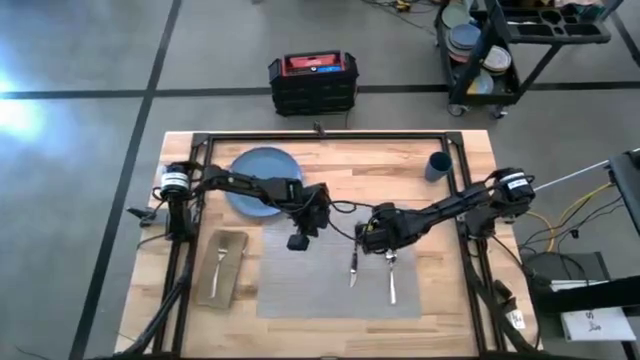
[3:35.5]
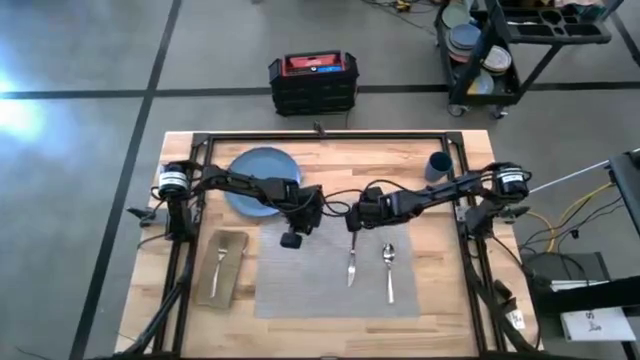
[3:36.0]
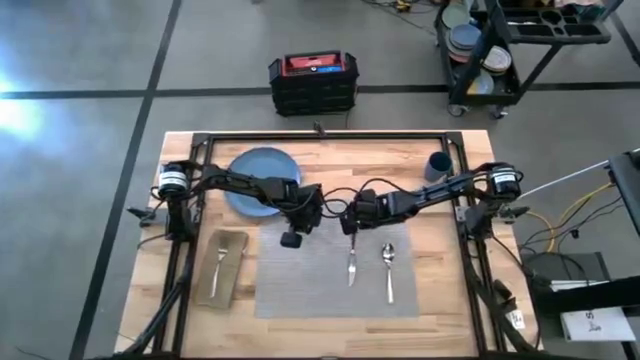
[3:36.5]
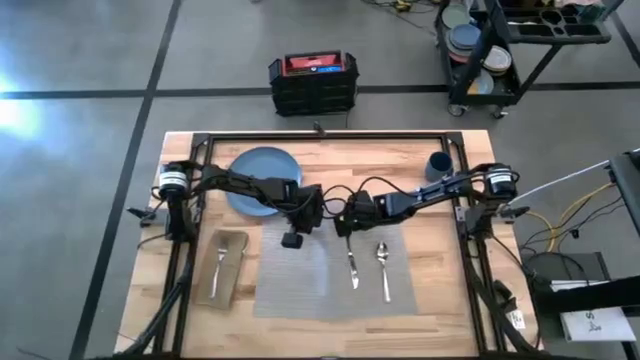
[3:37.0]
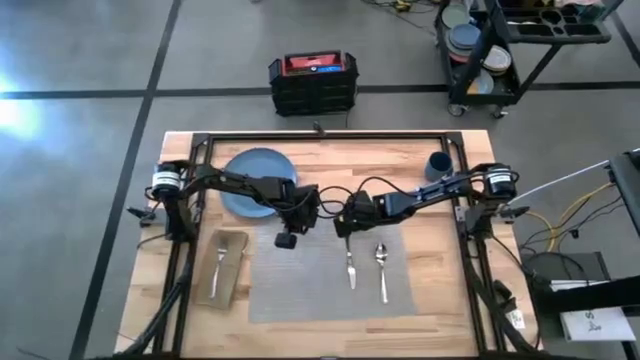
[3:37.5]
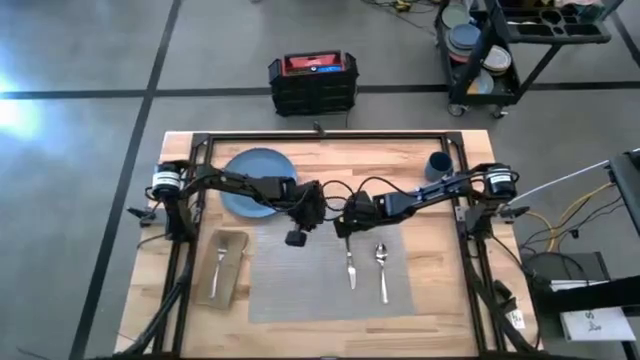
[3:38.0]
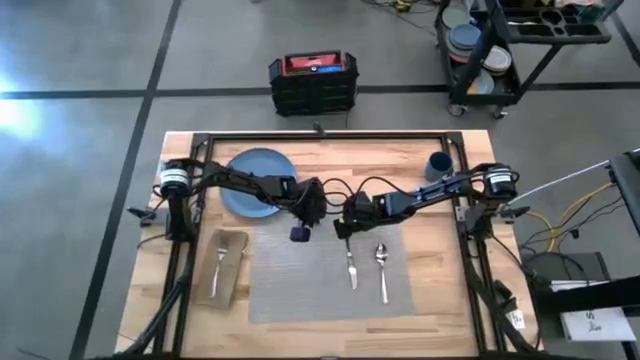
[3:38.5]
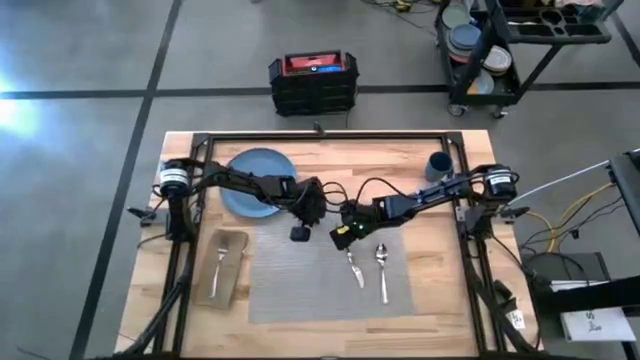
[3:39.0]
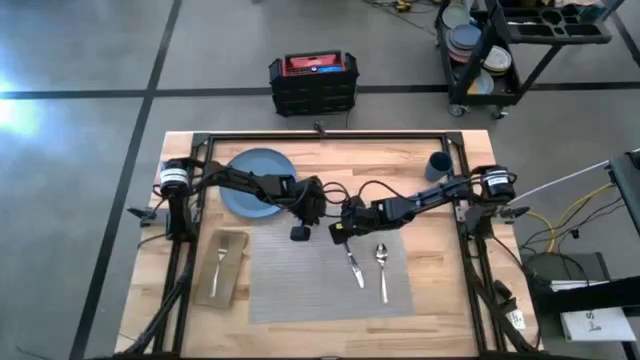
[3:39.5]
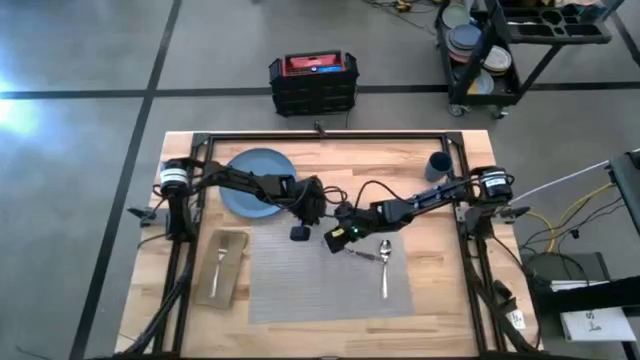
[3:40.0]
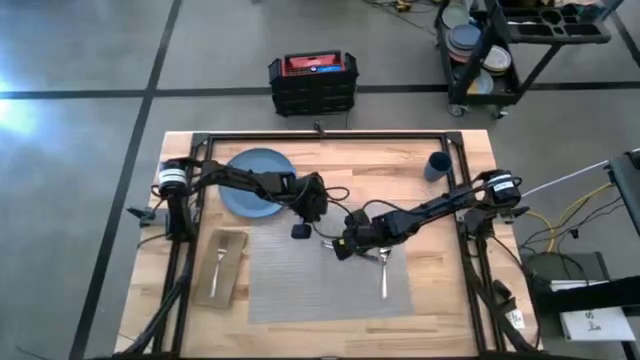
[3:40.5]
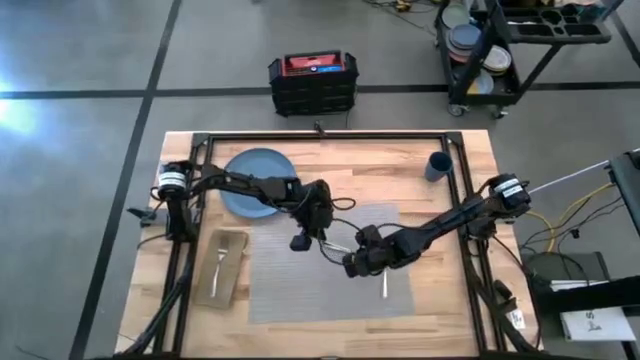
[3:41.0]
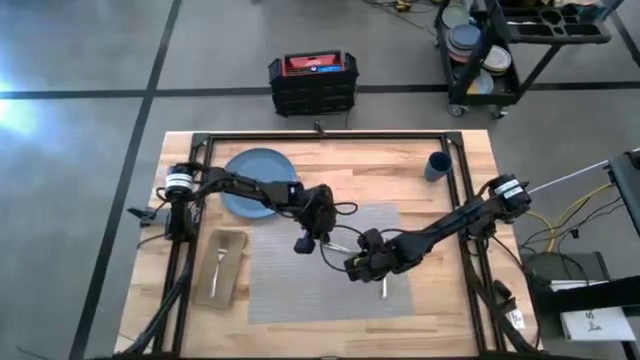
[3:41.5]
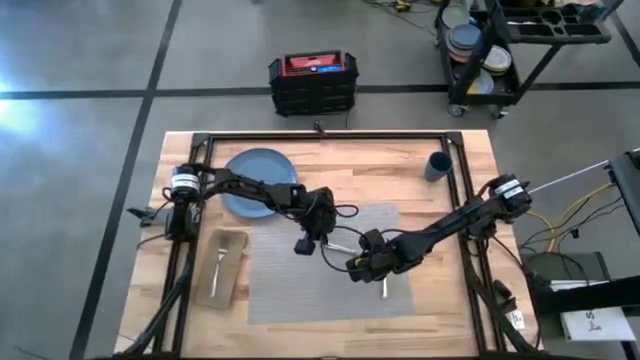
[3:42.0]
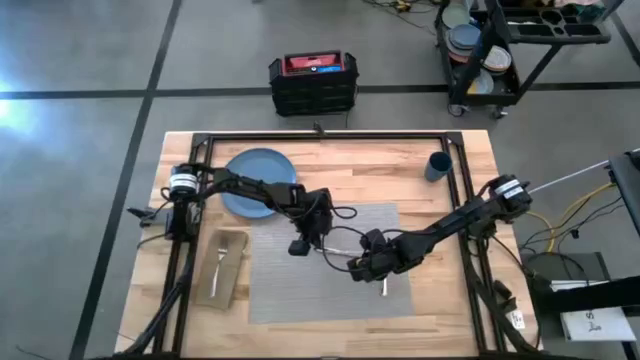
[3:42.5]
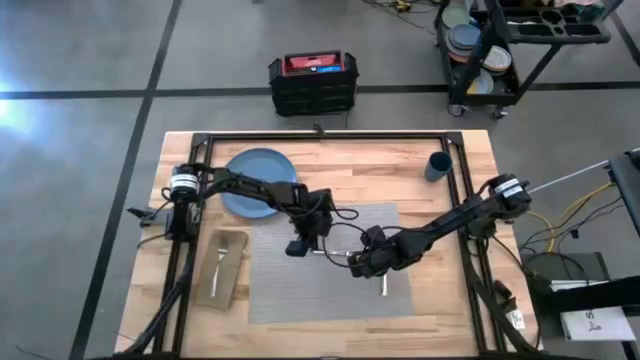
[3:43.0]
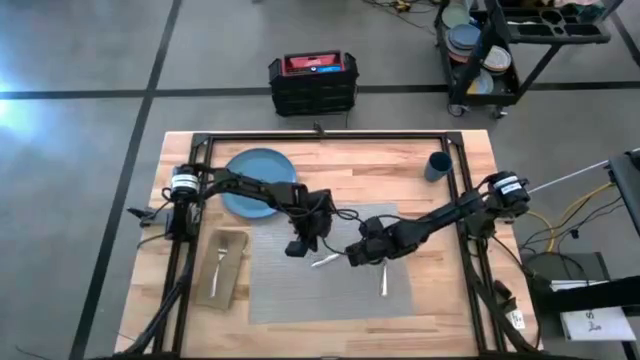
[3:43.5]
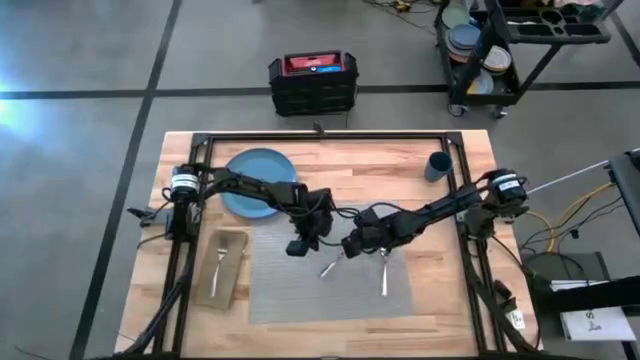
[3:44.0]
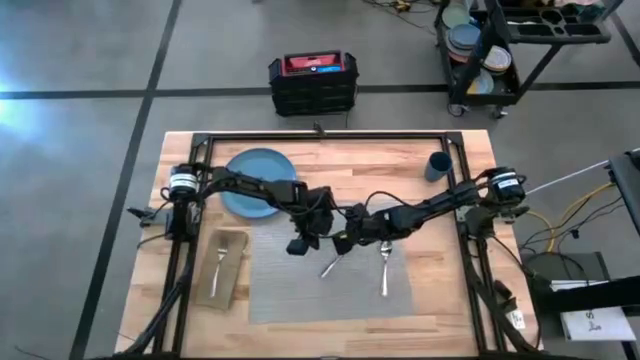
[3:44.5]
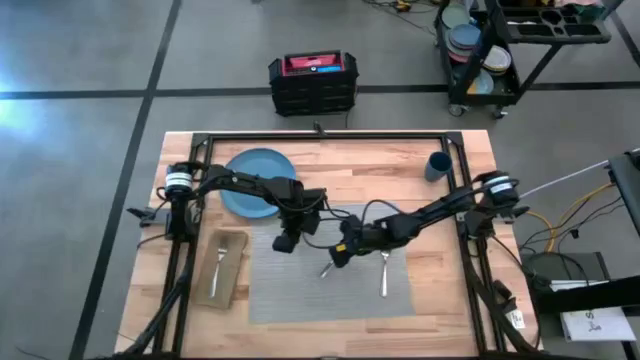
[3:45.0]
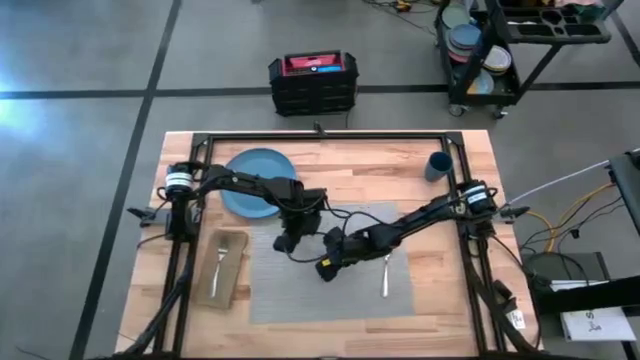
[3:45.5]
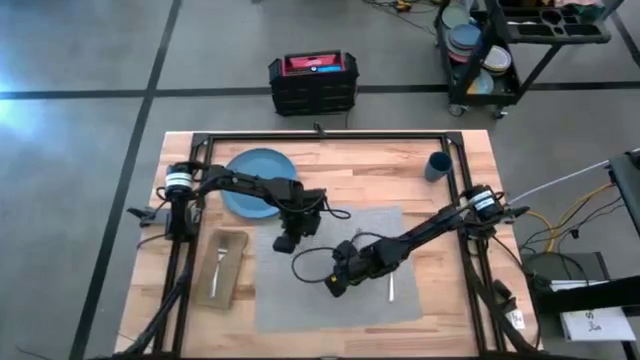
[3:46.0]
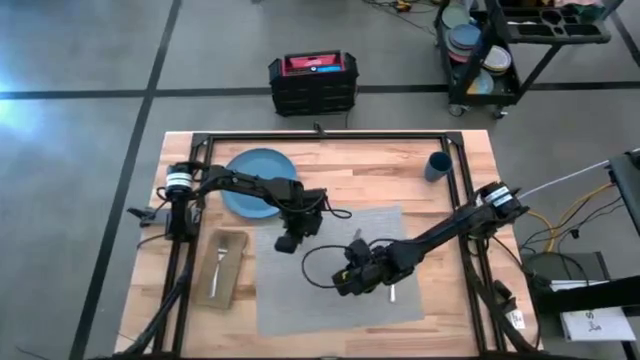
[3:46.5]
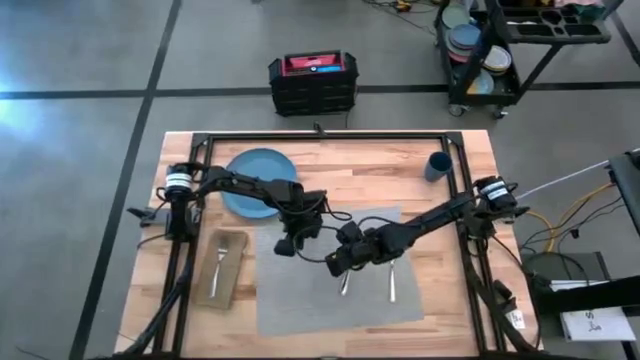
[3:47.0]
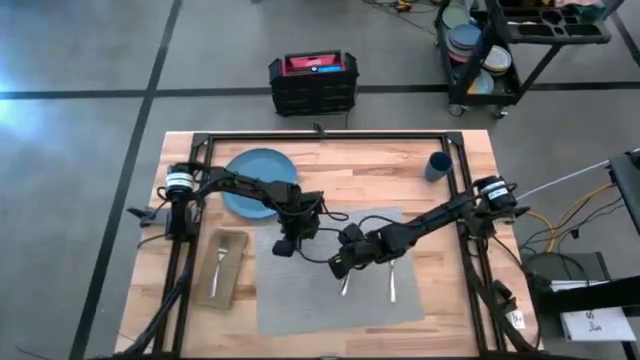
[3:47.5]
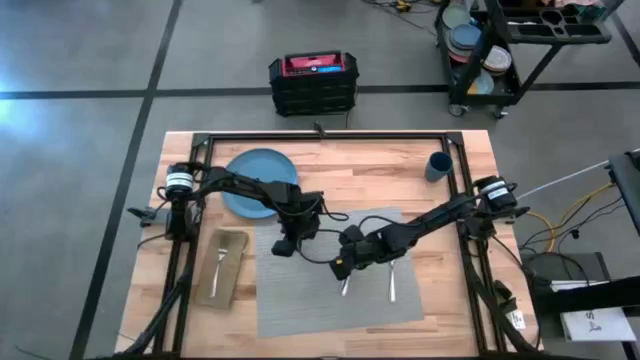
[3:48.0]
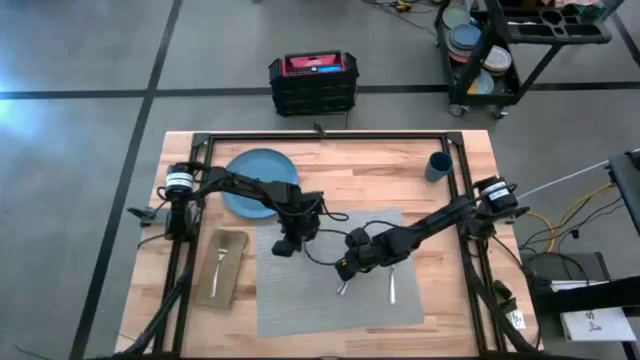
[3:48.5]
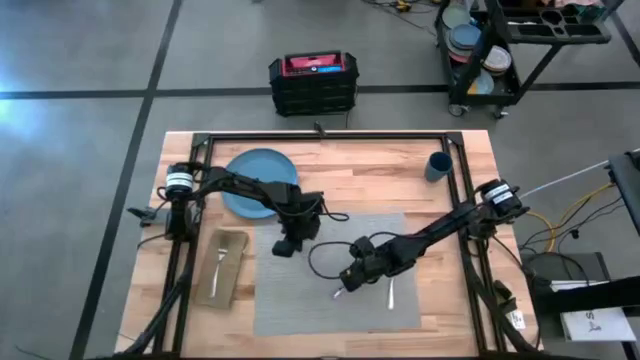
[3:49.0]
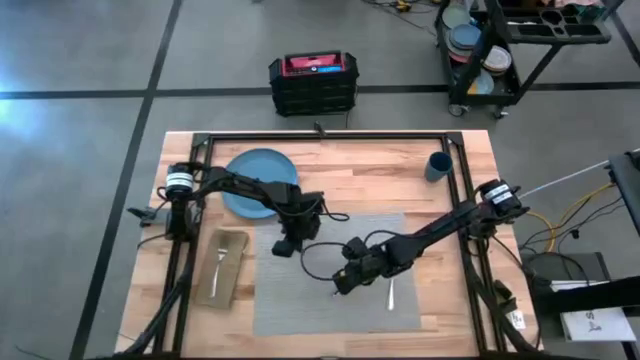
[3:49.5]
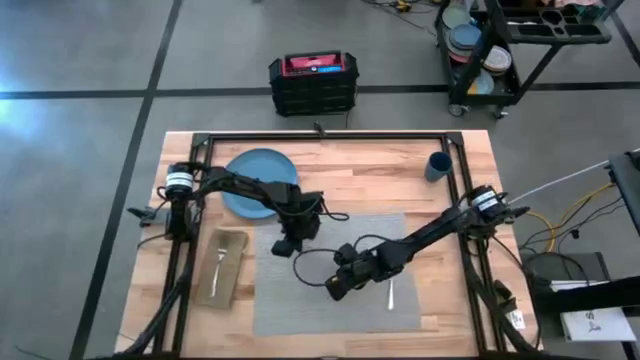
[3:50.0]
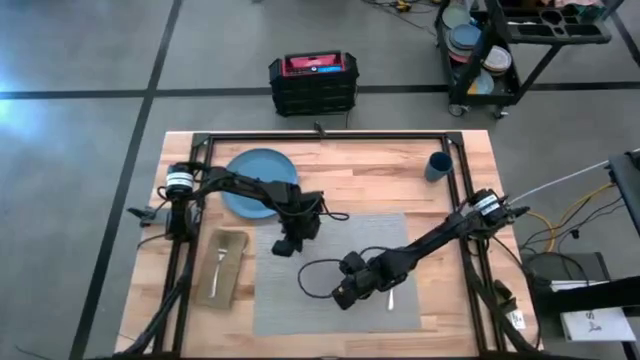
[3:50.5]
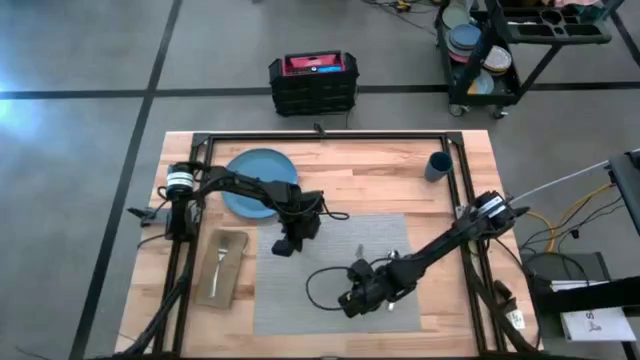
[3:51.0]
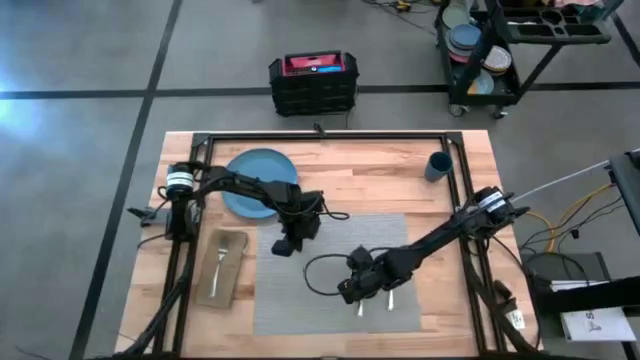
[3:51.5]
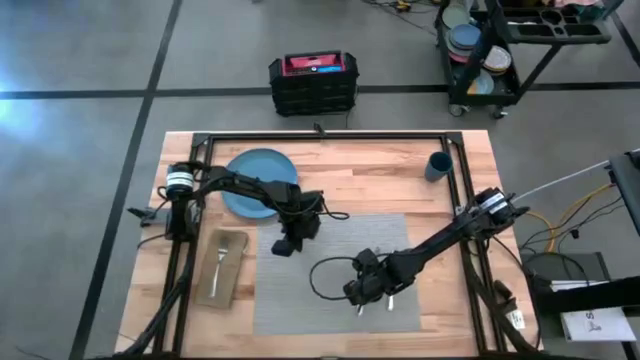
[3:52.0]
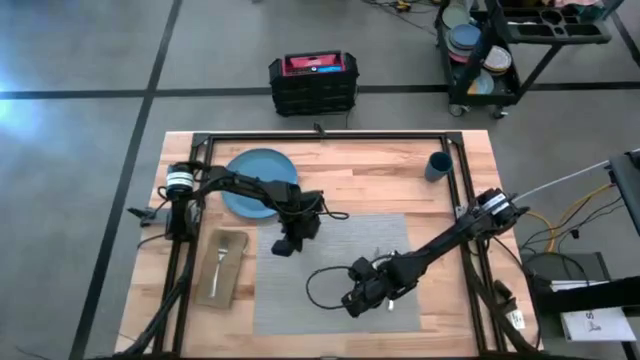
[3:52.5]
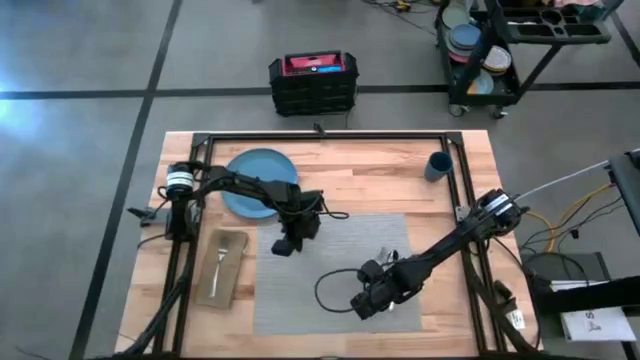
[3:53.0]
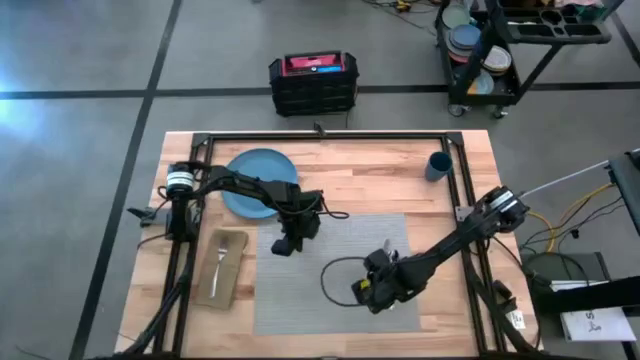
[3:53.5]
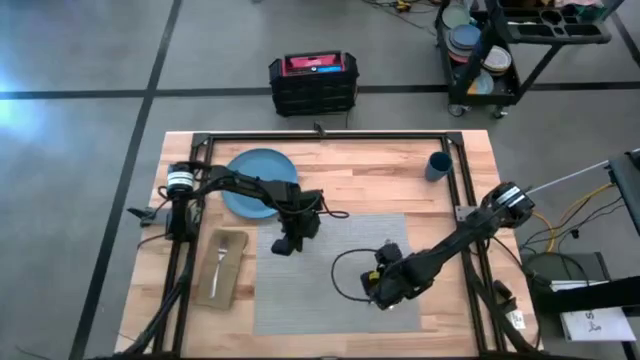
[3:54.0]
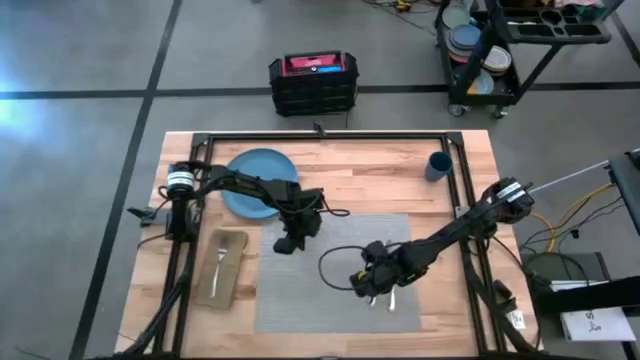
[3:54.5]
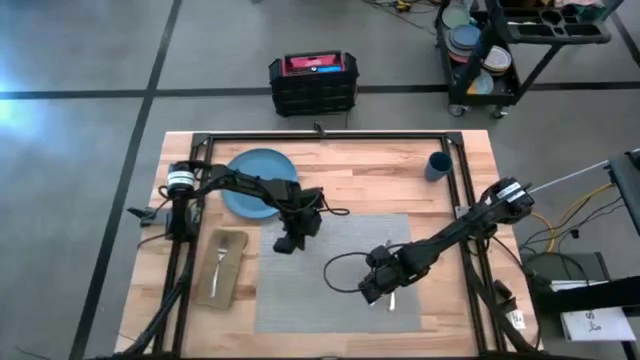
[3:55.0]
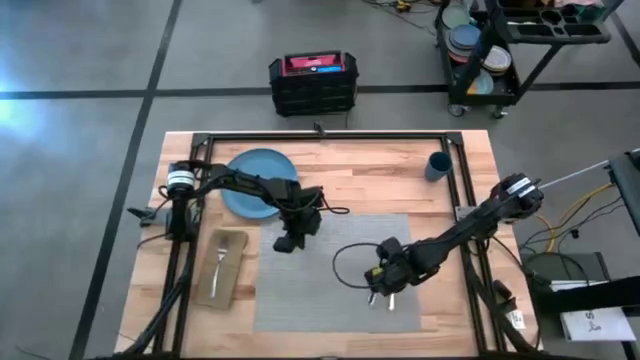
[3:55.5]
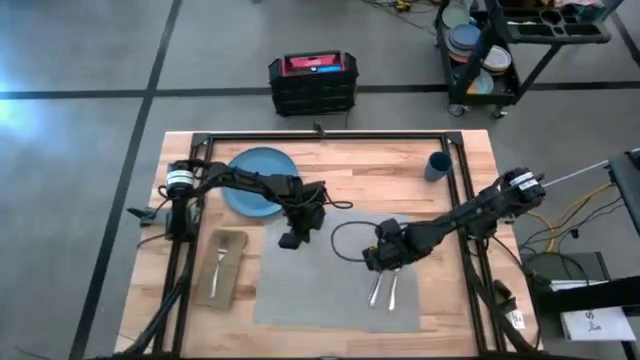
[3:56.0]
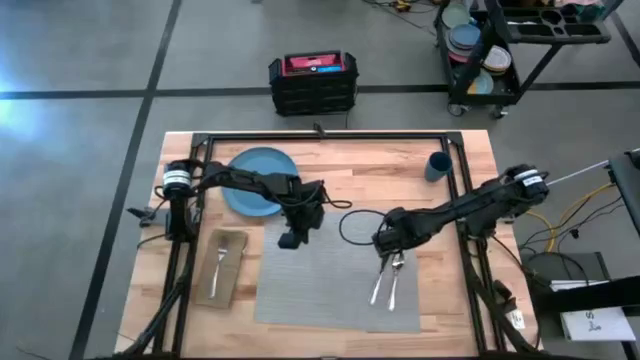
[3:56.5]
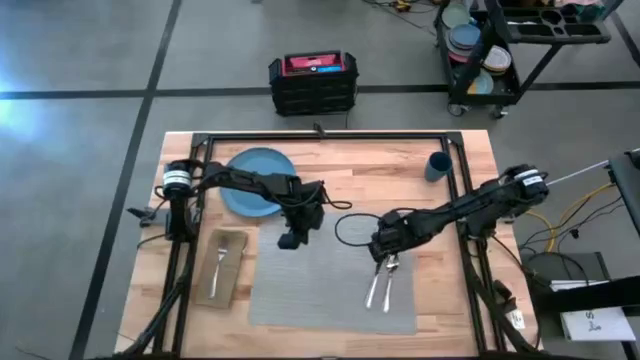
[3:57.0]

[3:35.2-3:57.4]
Task: Set table place
Put the silver table knife to the left of the silver spoon on the gray table mat
